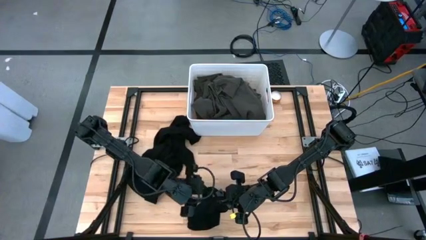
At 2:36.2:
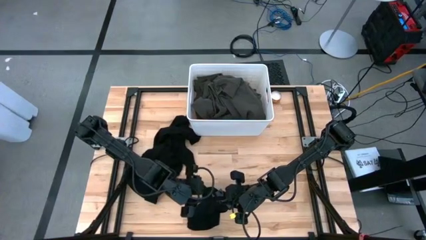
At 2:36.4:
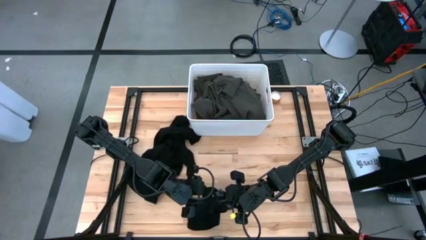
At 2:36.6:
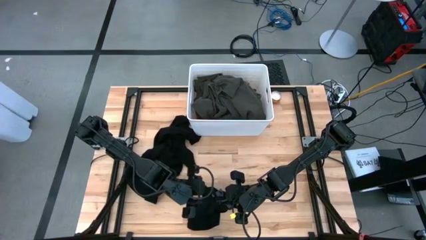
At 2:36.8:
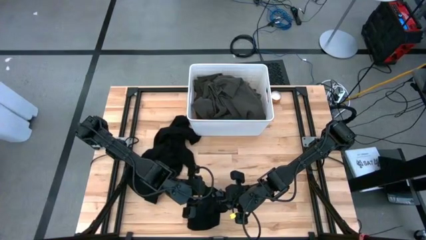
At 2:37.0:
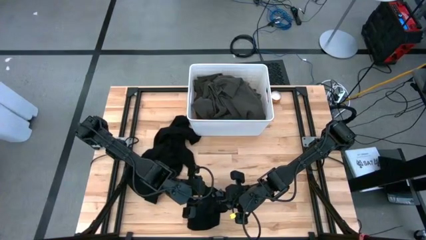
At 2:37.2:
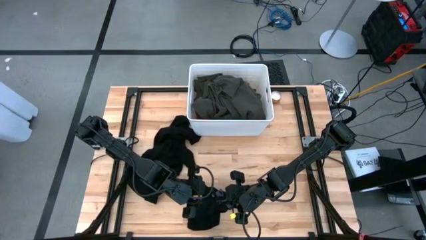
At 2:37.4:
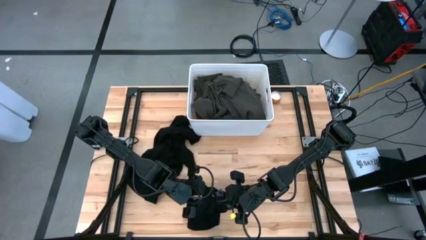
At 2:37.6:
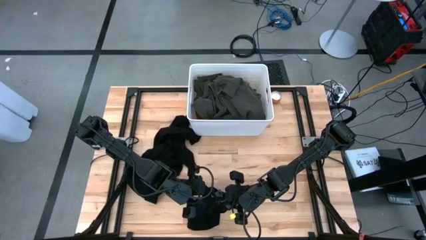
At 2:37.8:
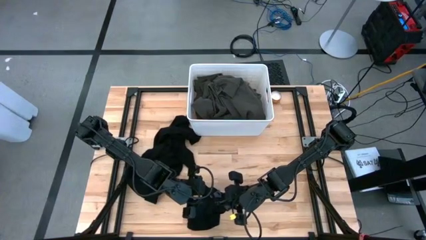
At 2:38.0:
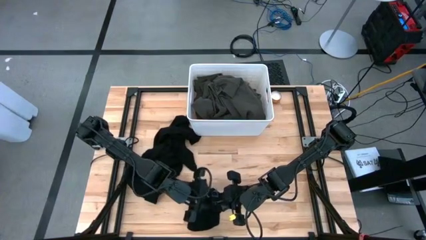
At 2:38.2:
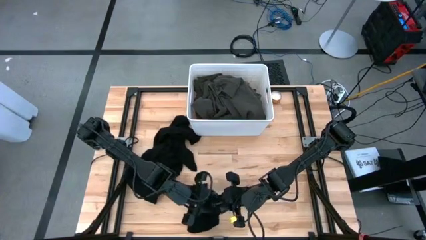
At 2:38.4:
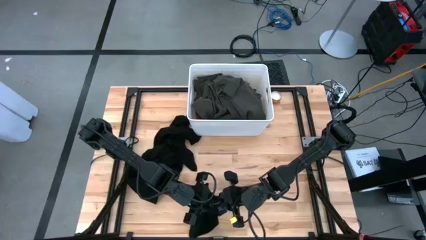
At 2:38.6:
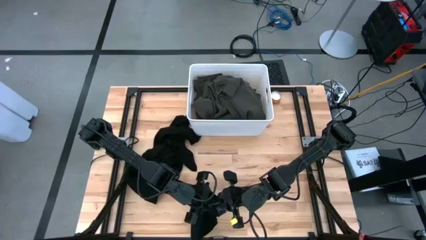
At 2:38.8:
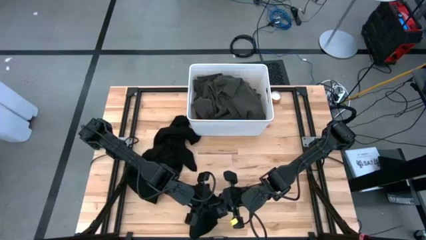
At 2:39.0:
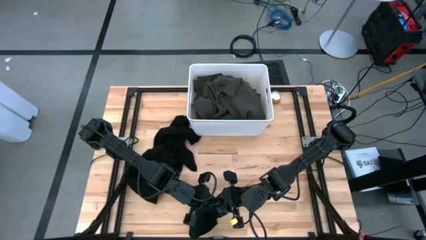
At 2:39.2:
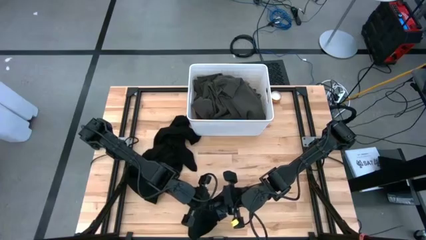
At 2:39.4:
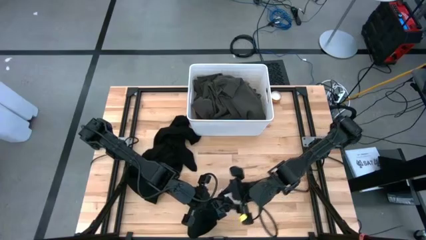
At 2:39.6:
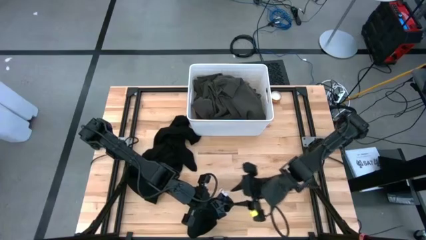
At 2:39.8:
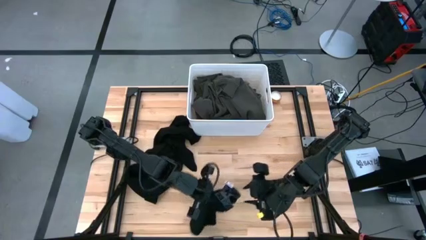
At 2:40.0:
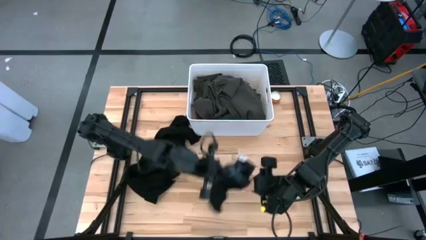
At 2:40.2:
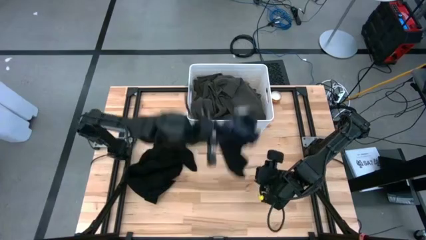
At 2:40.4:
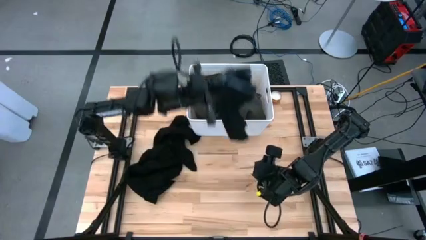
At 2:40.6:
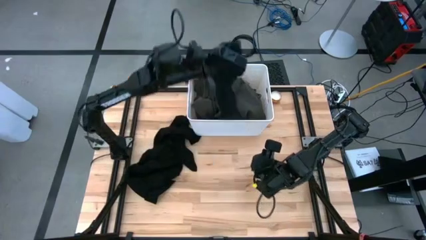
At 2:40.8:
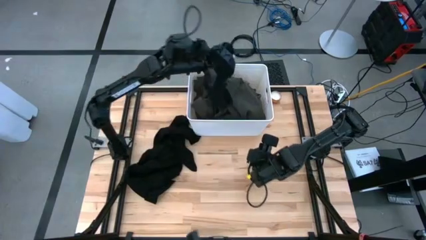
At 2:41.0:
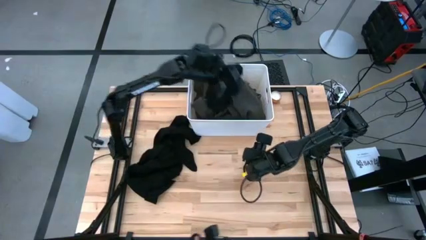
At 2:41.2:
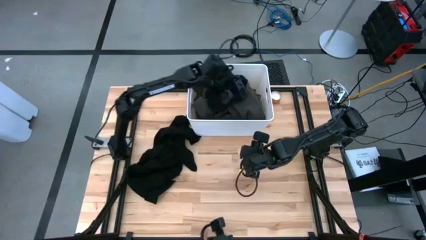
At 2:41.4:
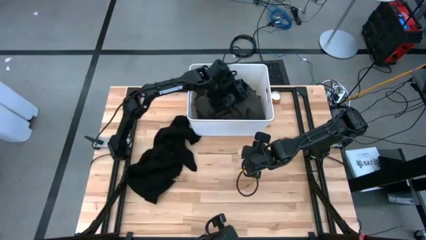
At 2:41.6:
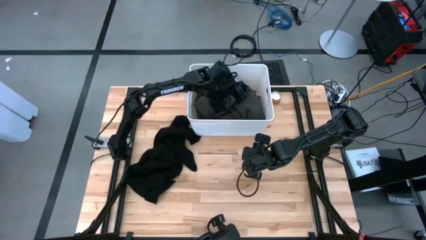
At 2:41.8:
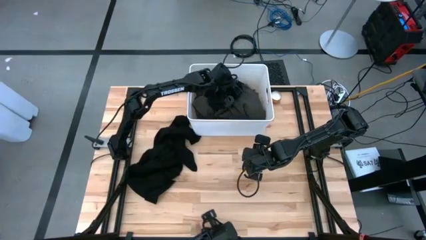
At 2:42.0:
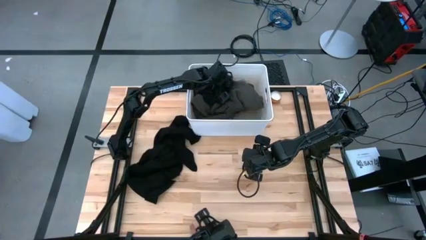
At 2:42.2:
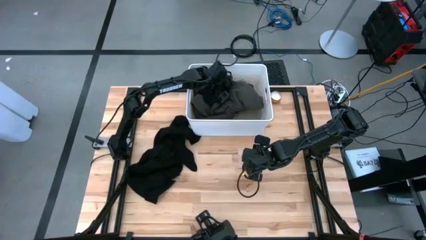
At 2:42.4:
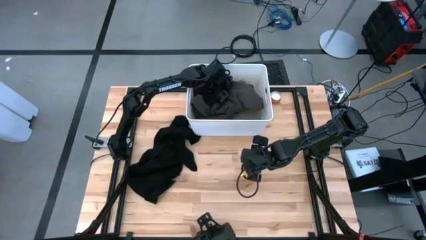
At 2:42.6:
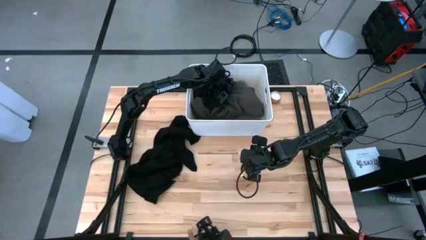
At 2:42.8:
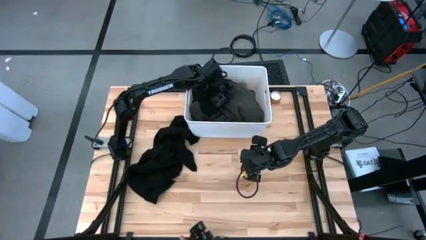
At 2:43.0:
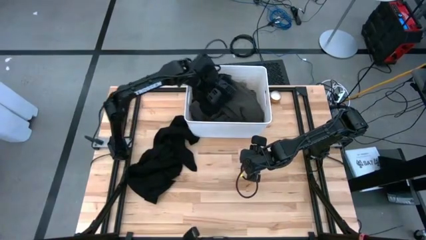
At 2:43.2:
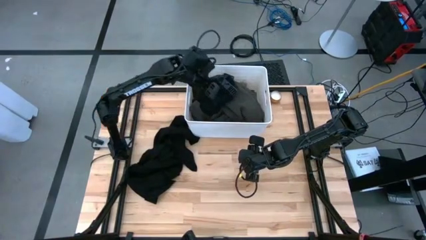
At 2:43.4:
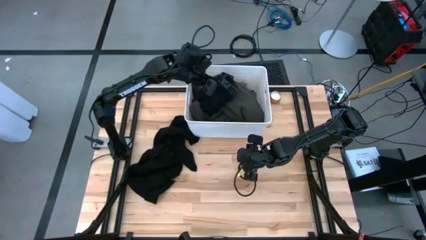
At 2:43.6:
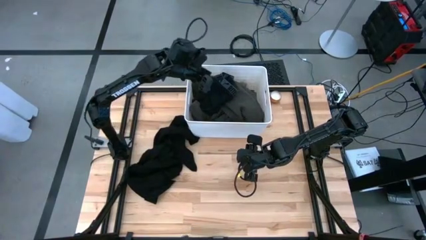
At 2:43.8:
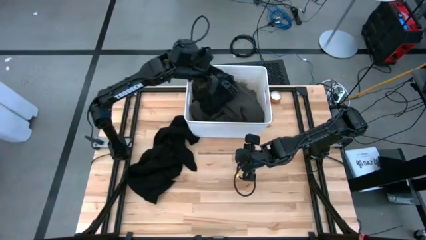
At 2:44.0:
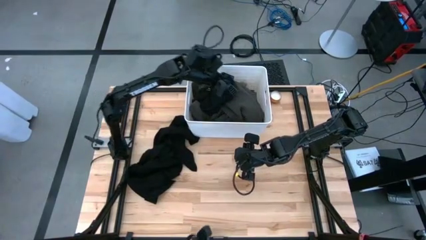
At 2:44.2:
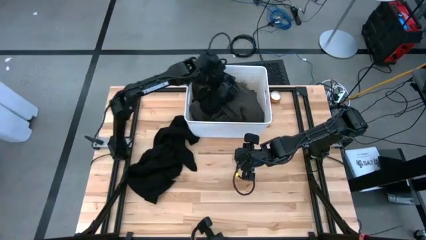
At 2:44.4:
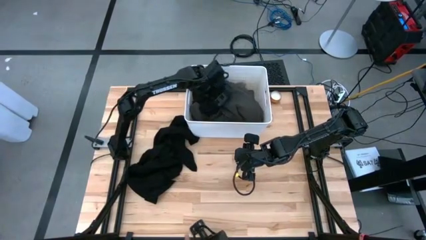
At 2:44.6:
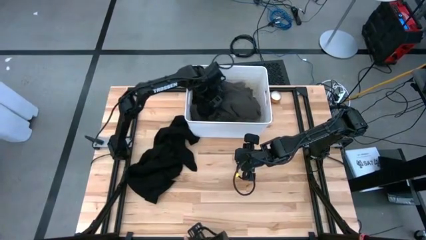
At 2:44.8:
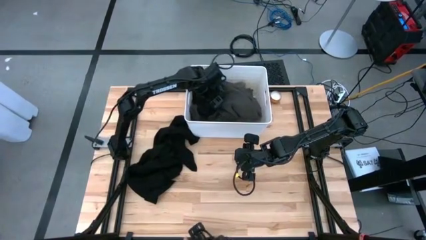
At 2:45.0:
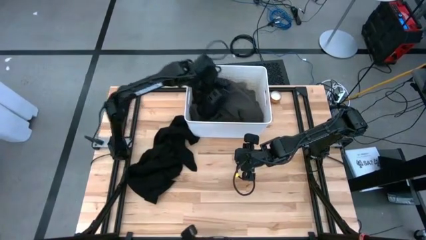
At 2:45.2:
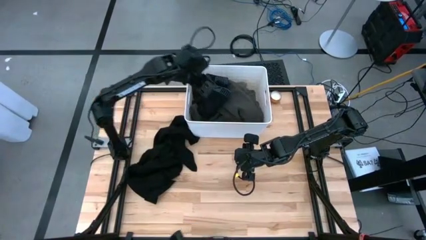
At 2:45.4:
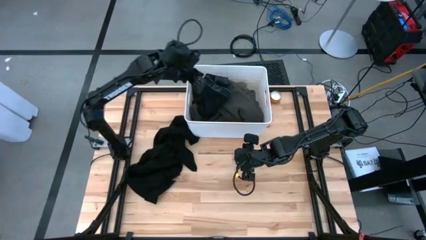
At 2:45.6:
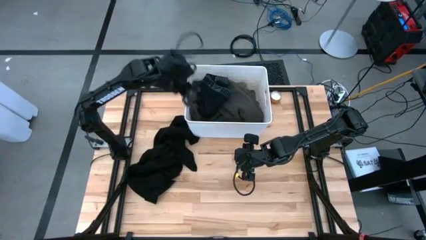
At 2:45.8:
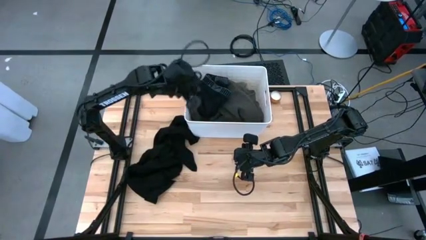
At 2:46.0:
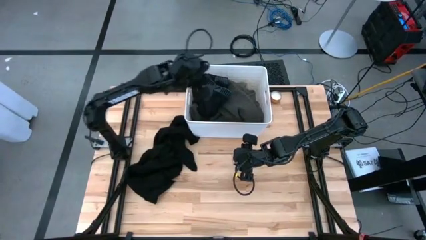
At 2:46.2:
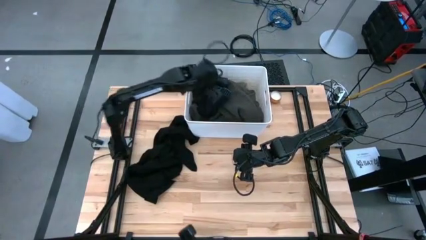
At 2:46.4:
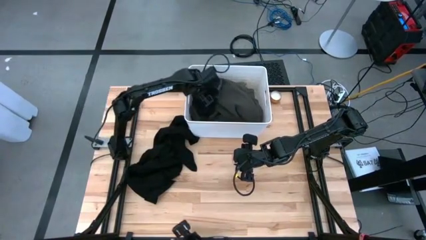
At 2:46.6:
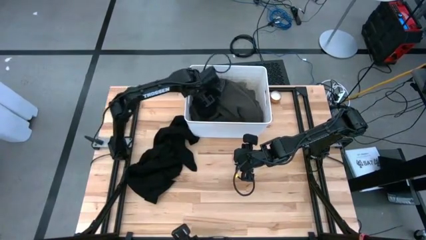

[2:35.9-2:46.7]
Task: Sort clothes
Put the black boxer into the white bin

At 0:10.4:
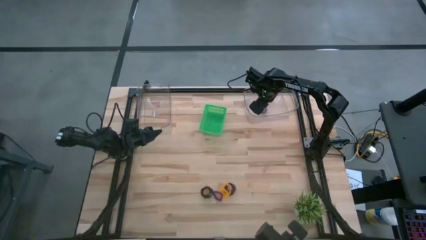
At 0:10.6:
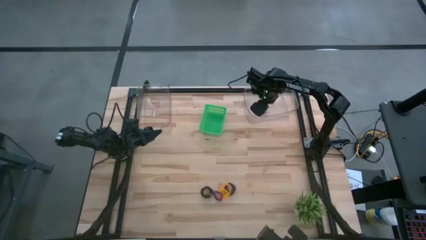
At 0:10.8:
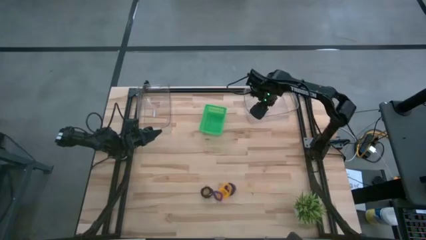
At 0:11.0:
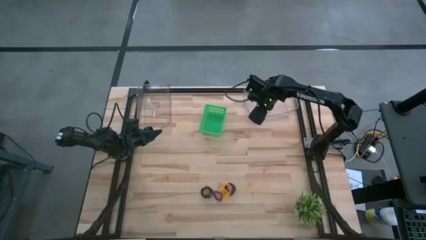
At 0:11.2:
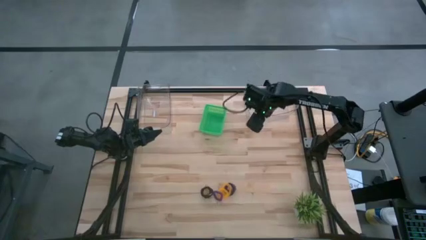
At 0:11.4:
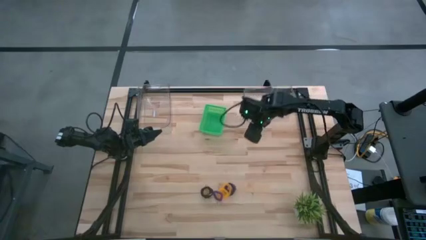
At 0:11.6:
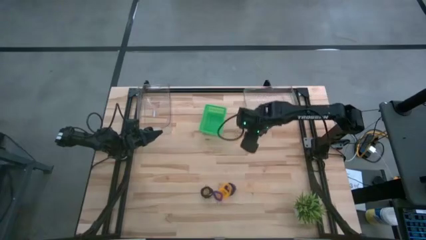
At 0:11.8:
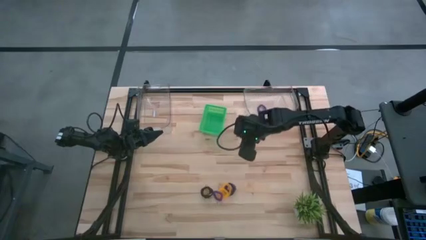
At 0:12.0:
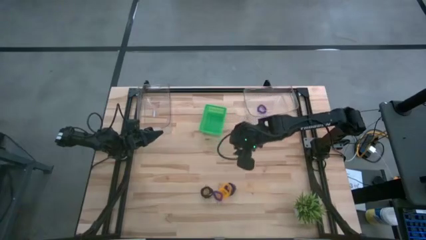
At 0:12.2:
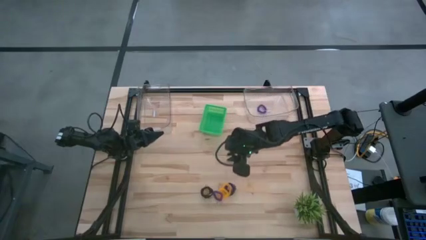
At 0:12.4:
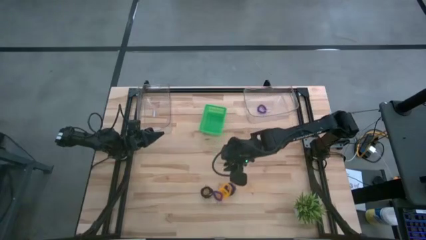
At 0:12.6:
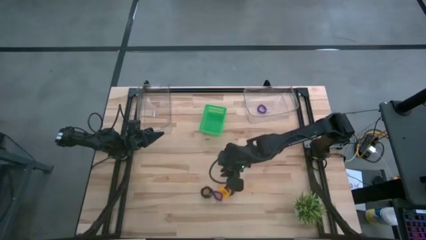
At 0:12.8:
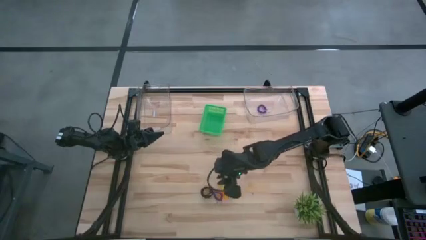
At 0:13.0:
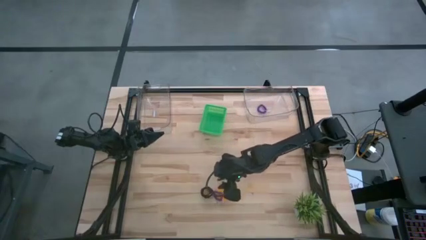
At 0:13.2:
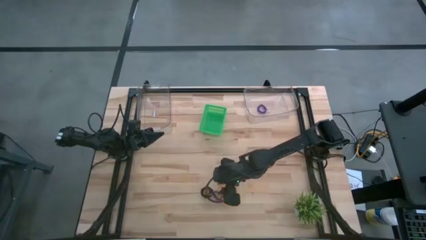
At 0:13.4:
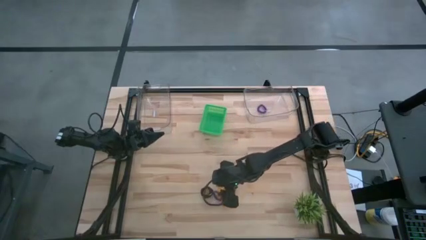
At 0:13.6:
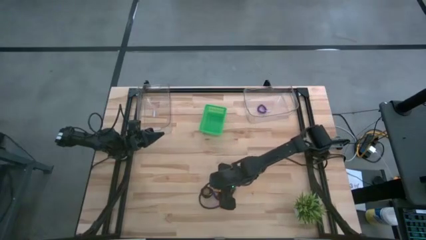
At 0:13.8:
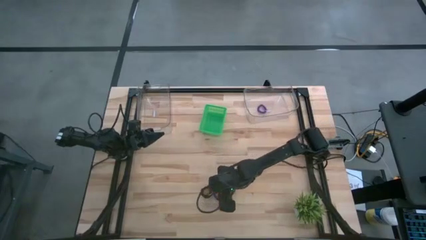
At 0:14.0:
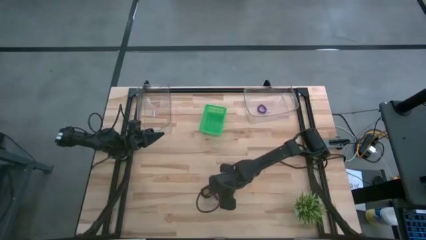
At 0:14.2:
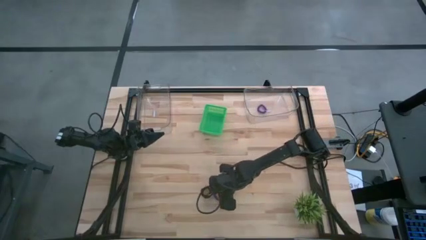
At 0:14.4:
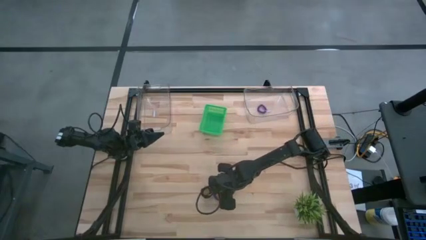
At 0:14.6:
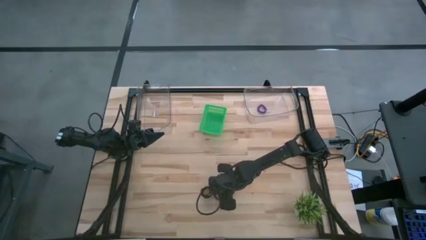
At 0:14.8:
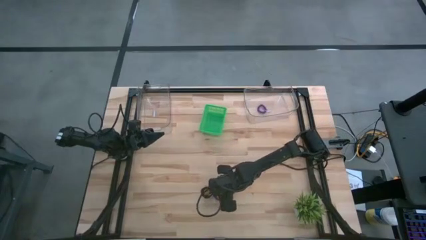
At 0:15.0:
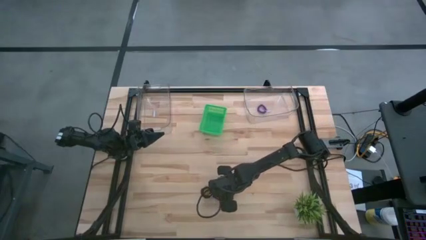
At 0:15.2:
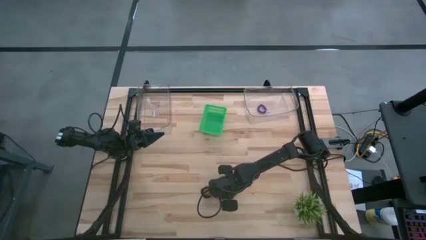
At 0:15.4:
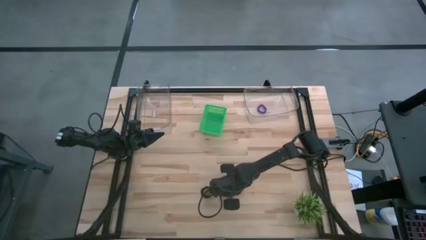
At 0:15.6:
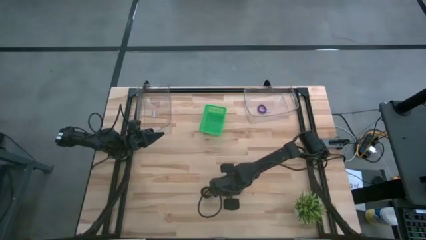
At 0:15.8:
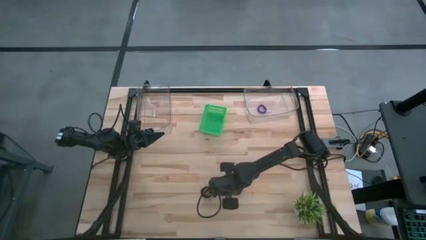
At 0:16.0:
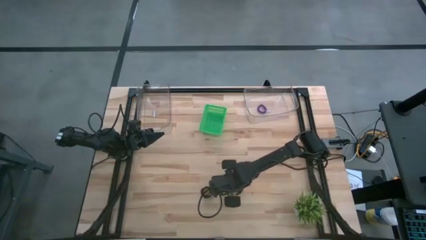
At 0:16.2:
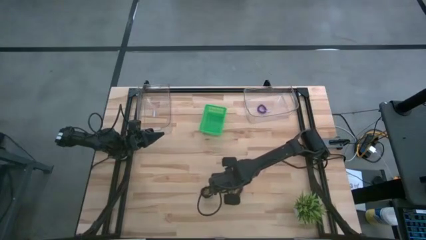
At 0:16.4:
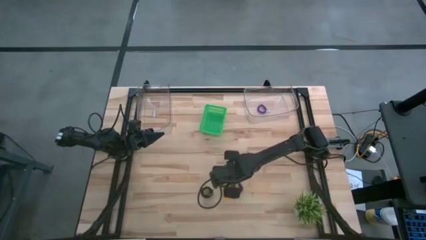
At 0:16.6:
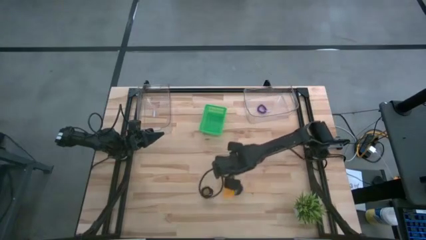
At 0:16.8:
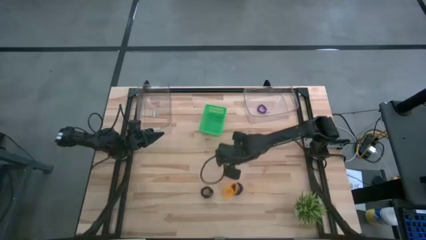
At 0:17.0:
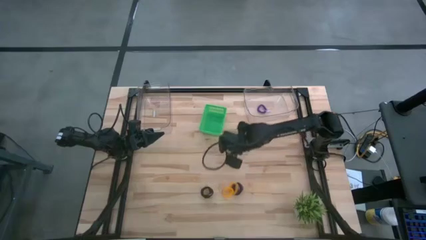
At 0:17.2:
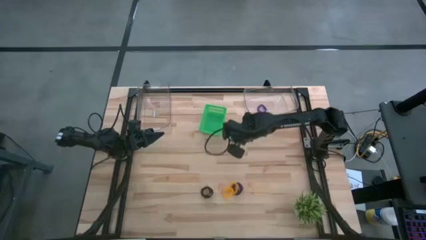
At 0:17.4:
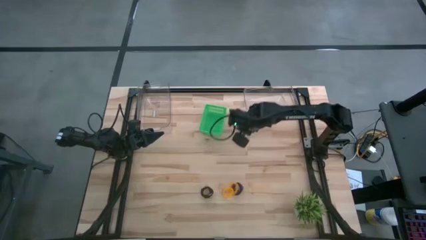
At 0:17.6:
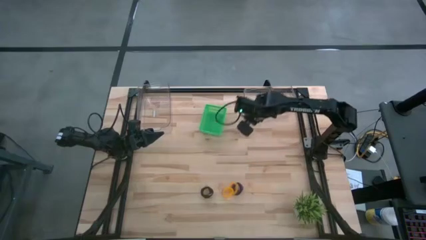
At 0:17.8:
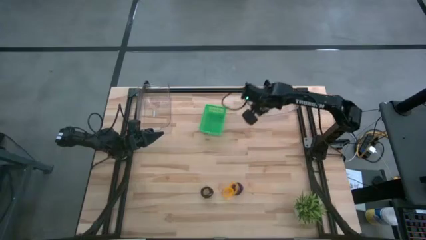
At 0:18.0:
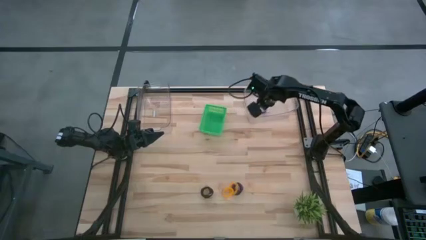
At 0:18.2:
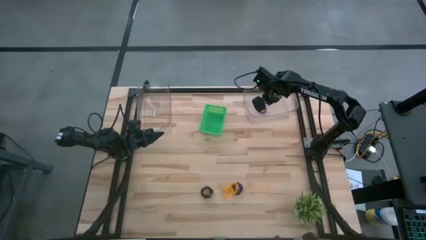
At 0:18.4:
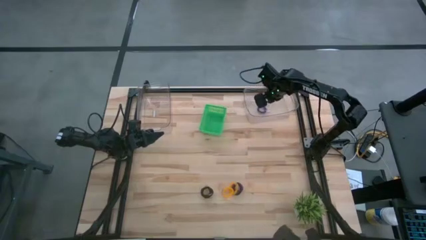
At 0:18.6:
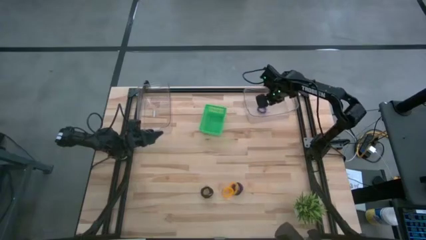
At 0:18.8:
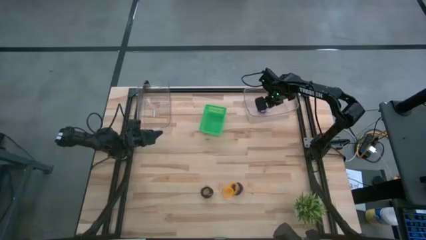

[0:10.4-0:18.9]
Task: Sort spring keychains
Put the purple spring keychain into the right transparent bin
